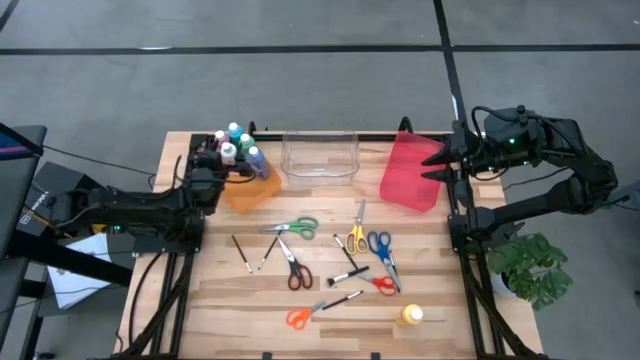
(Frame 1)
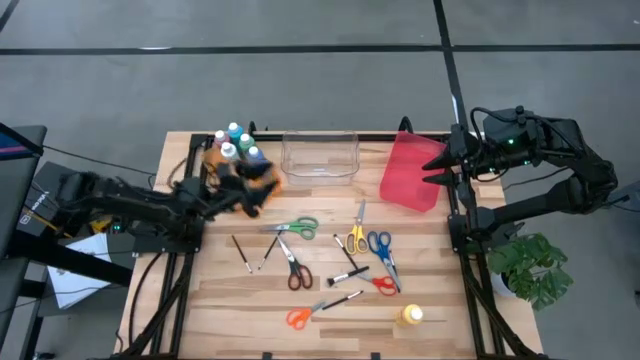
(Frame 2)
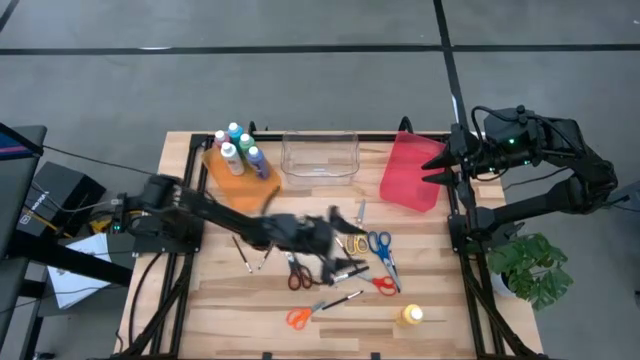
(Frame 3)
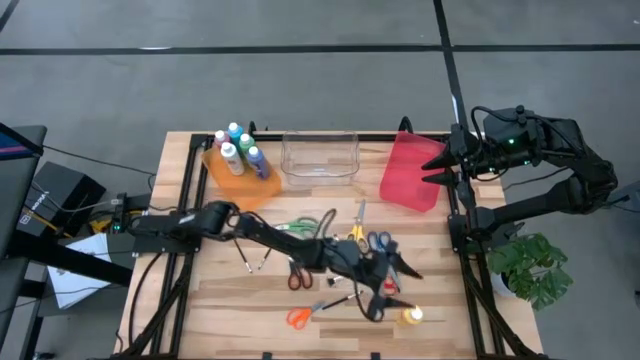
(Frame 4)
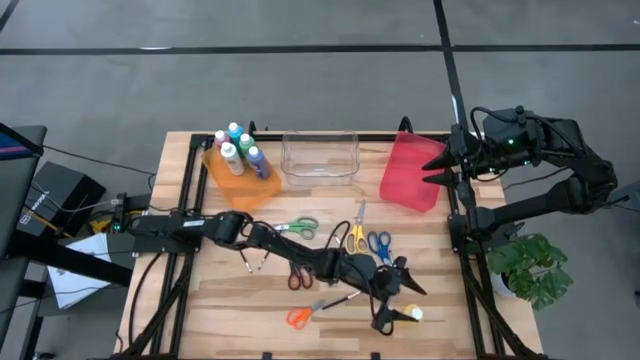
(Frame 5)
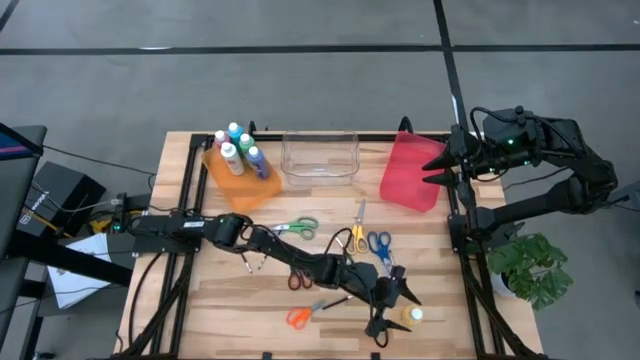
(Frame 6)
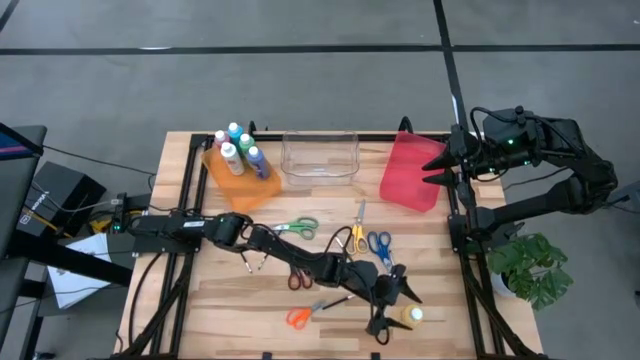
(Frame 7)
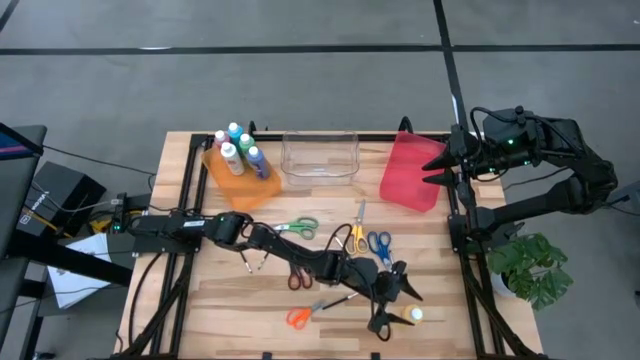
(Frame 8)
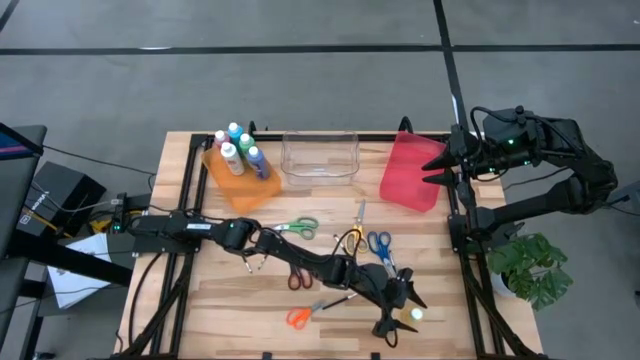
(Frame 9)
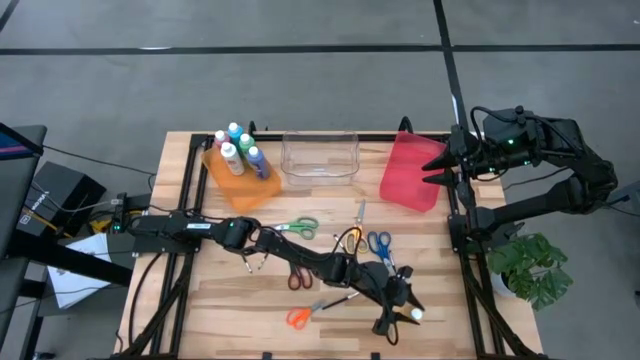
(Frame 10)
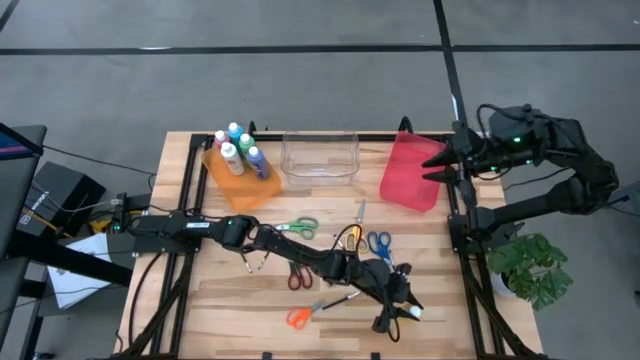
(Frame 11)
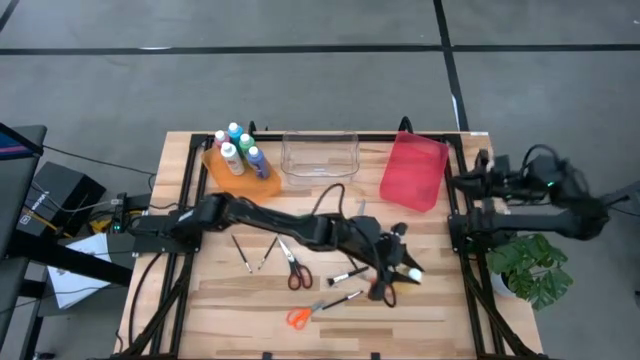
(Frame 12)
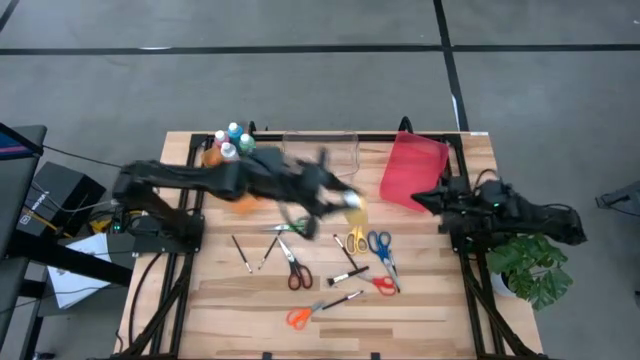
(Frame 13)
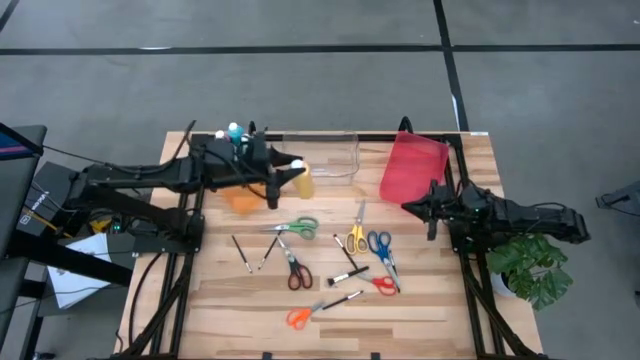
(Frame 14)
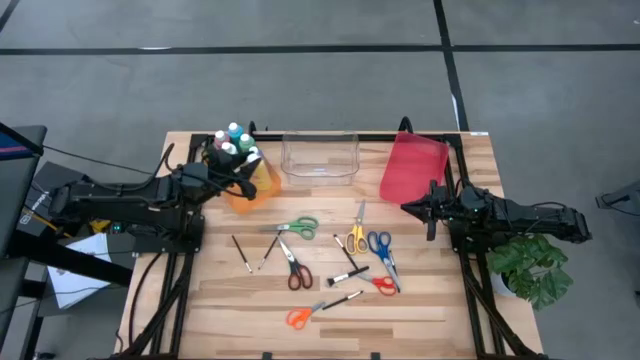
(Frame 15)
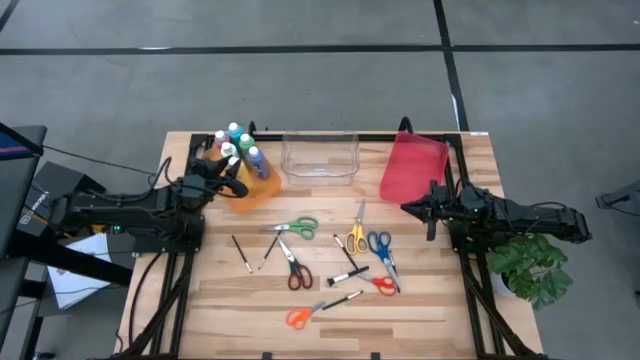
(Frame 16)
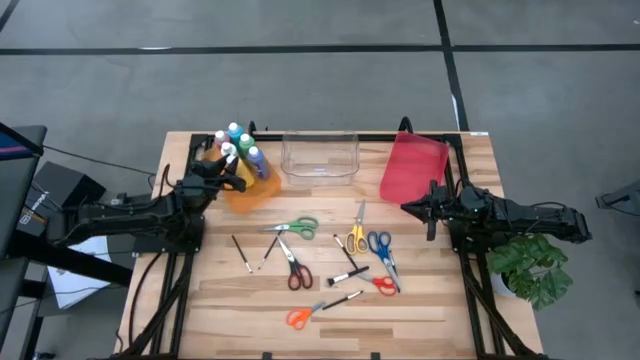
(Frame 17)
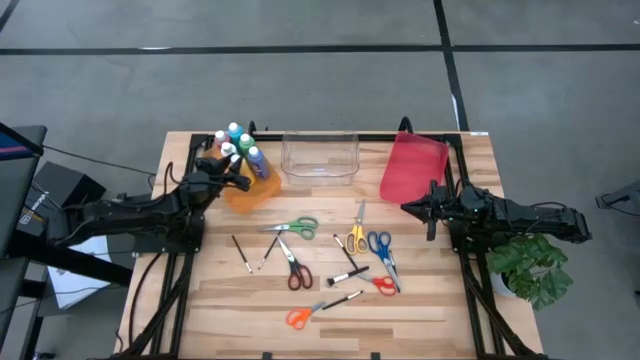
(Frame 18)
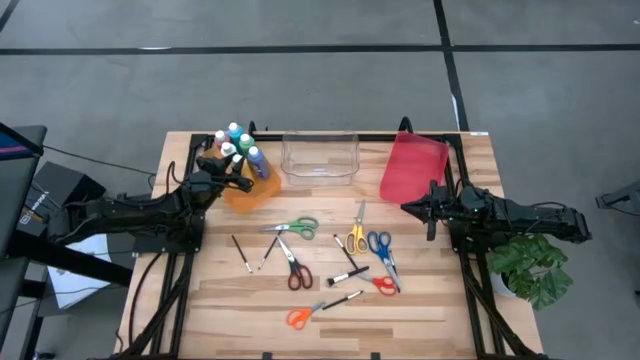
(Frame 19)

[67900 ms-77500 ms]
Task: Pick & Place Paint Supplies
Put the yellow paint bottle into the orange bin

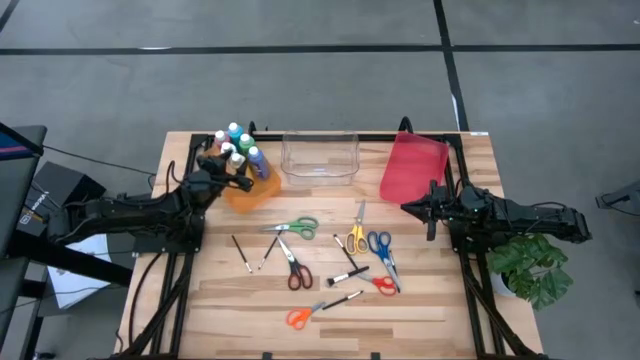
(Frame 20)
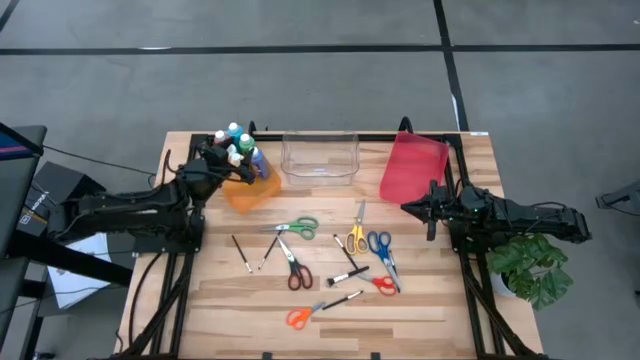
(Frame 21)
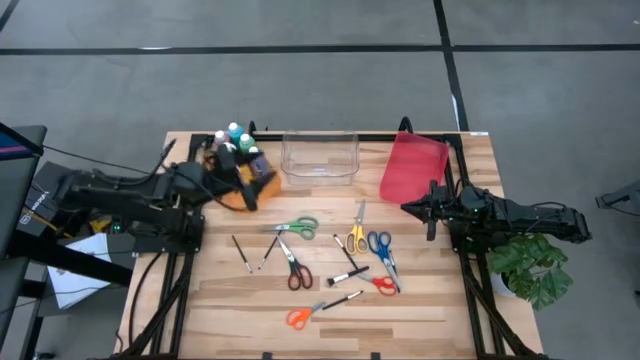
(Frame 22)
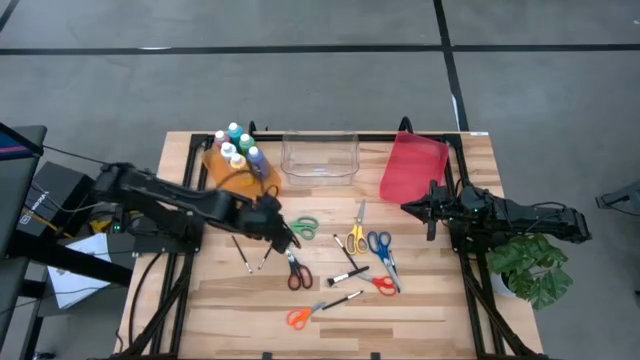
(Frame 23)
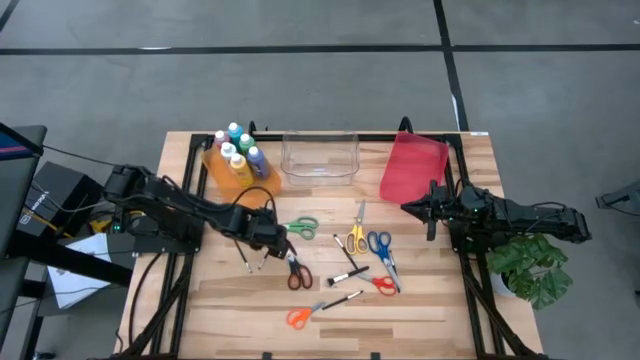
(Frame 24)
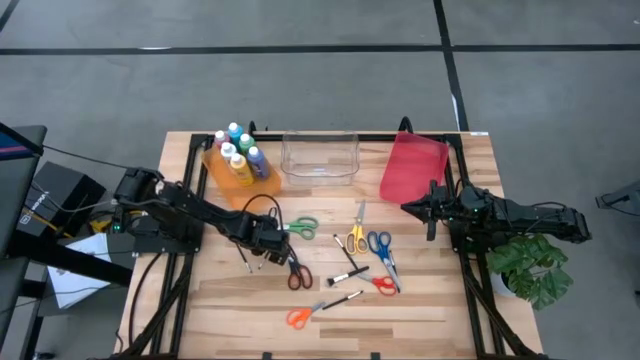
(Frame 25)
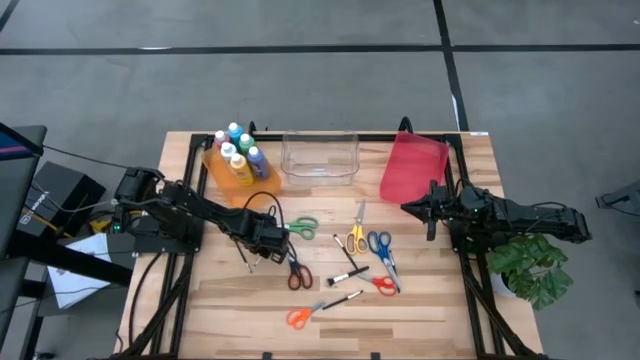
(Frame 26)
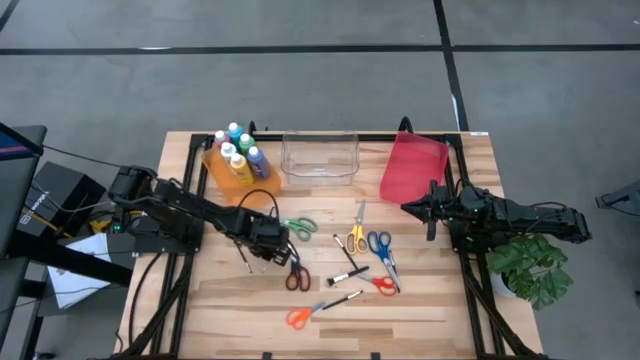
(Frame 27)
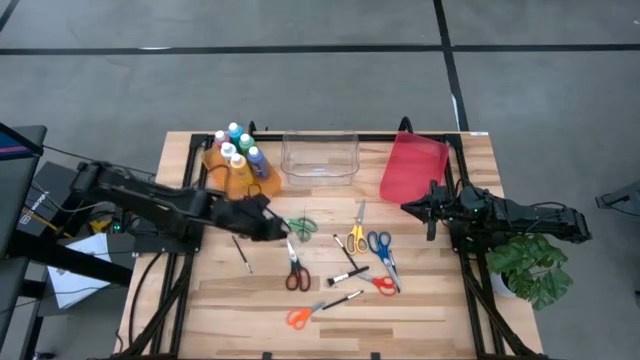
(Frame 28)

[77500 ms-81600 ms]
Put the black paint brush into the transparent bin

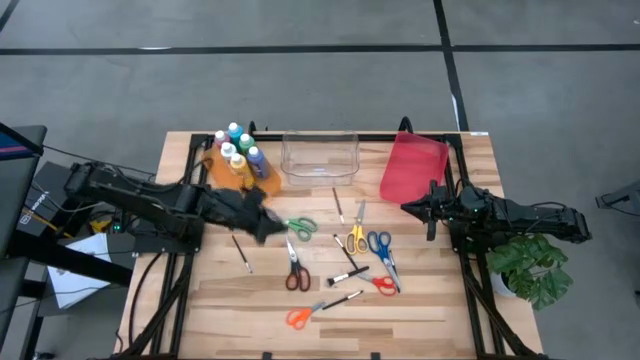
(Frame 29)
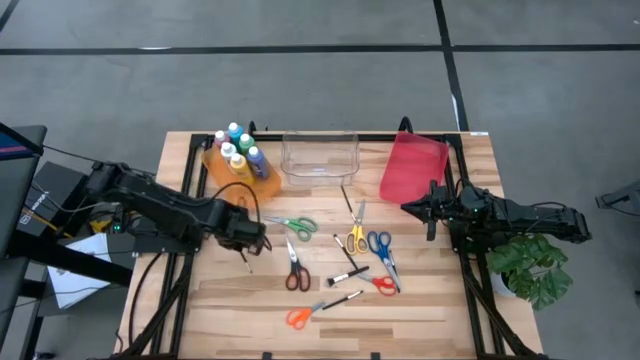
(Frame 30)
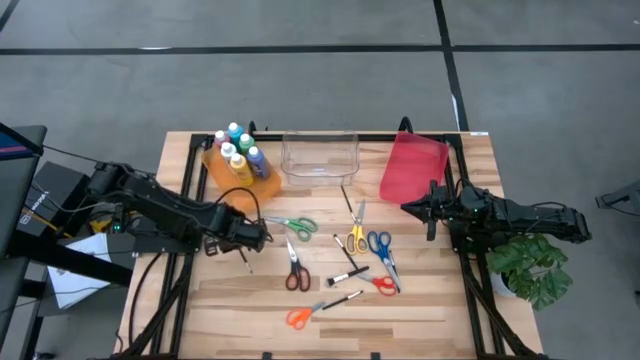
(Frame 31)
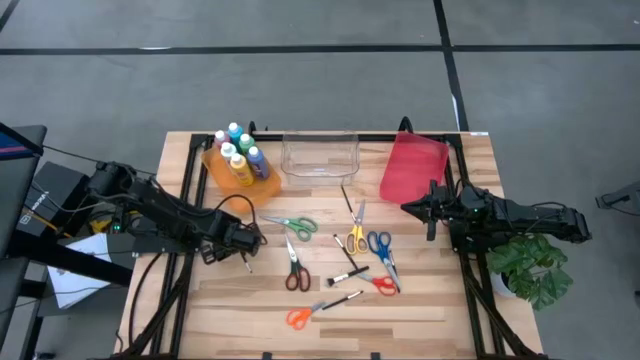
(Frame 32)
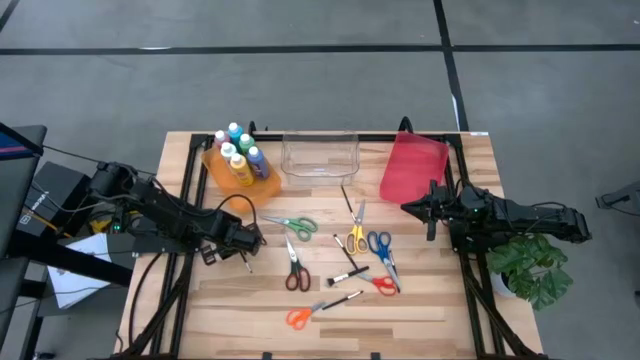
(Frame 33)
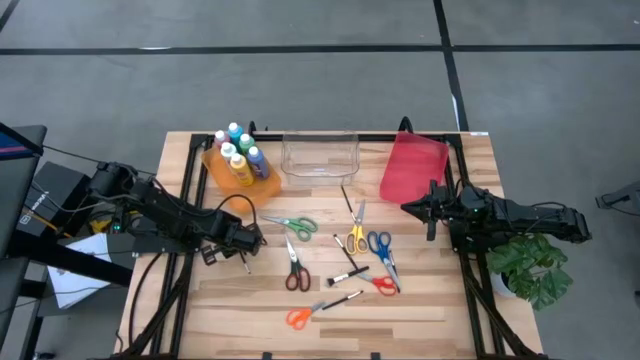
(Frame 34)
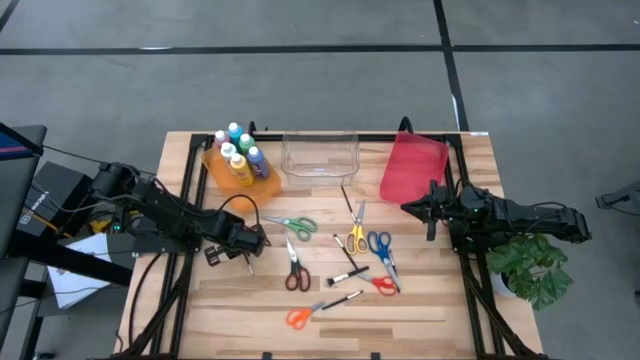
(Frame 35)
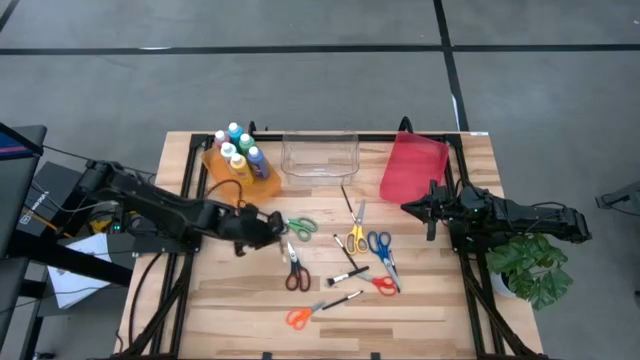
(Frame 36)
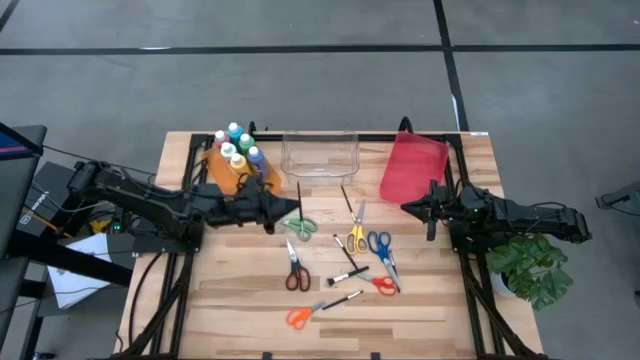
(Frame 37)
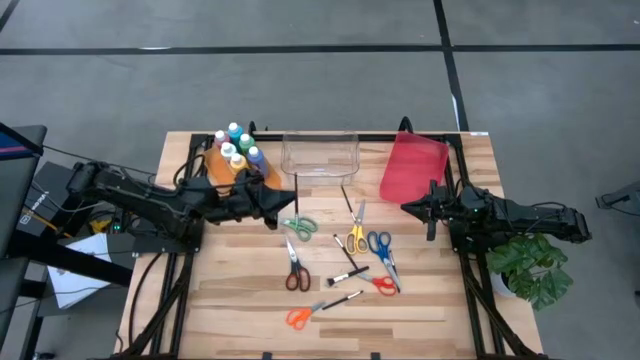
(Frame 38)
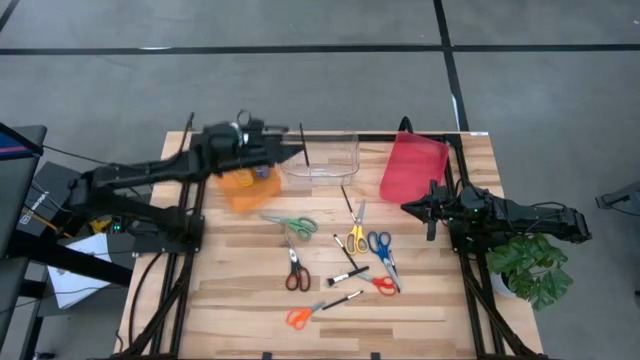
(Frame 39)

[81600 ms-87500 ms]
Put the black paint brush into the transparent bin

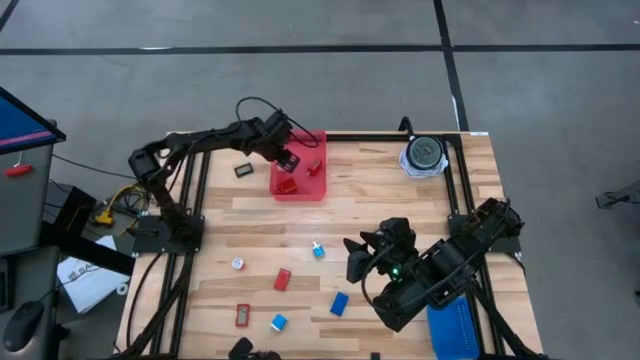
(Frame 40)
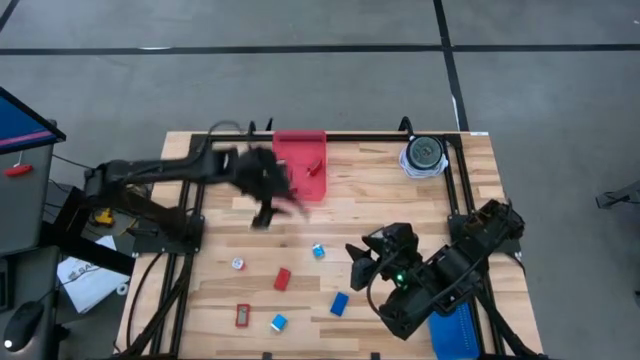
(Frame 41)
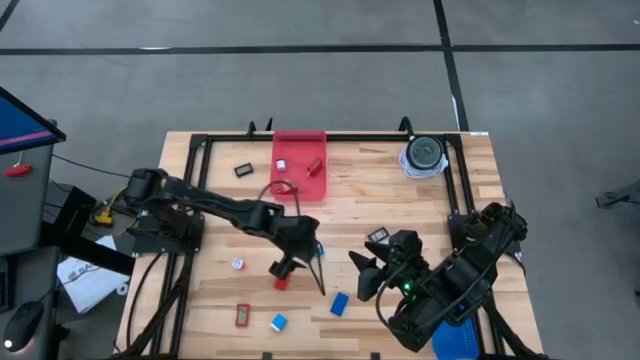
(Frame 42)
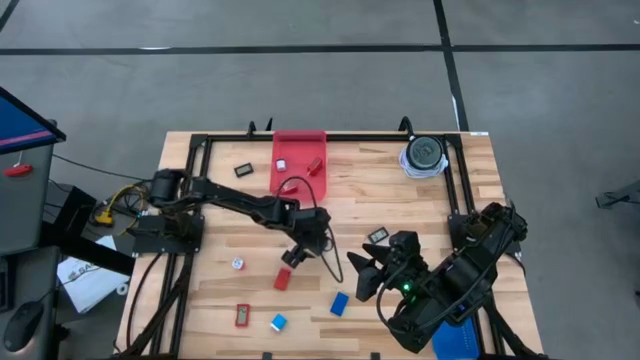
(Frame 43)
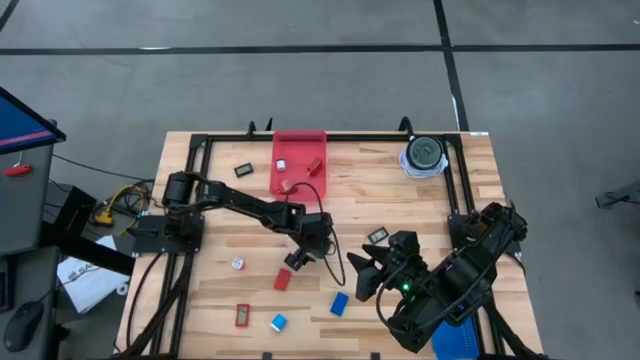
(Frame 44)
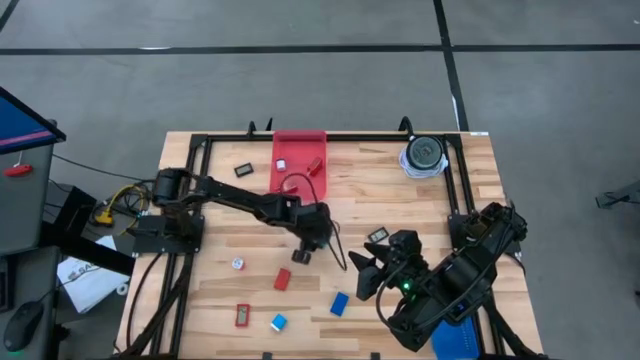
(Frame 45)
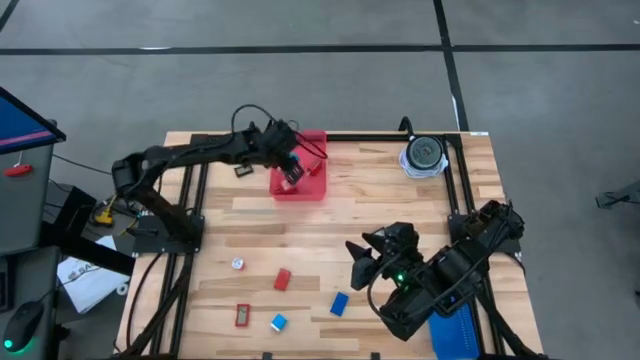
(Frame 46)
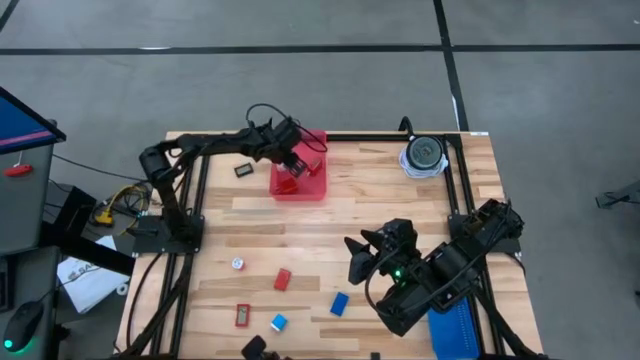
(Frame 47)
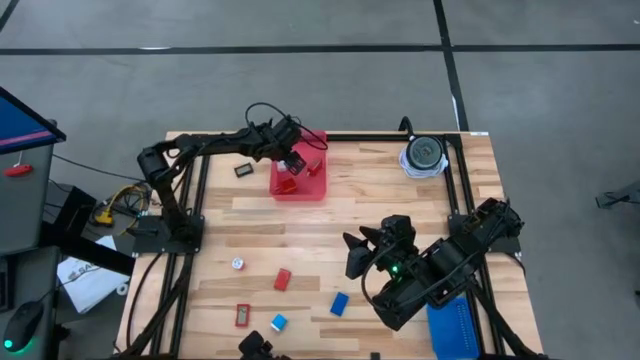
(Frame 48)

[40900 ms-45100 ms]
Task: Pick & Place Office items
Put the top blue and white charger adapter into the red bin
